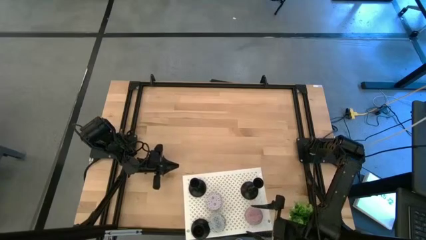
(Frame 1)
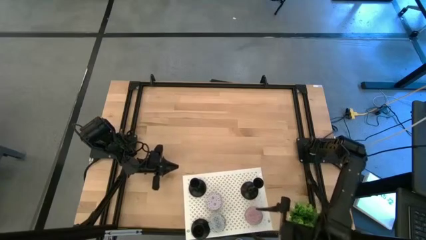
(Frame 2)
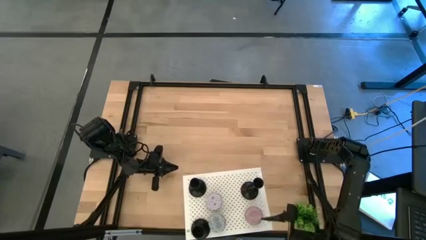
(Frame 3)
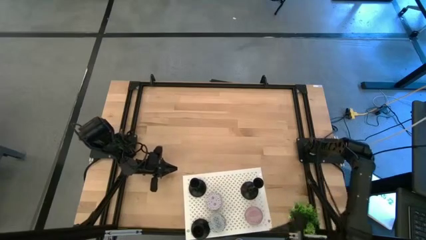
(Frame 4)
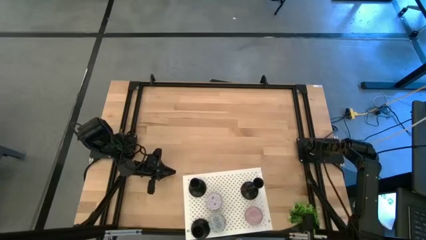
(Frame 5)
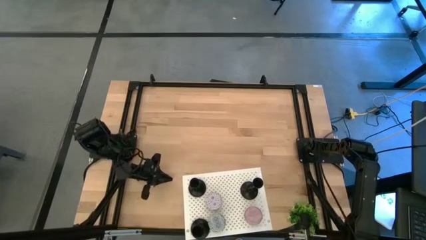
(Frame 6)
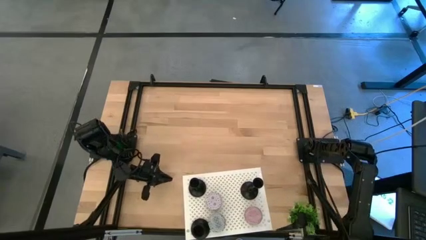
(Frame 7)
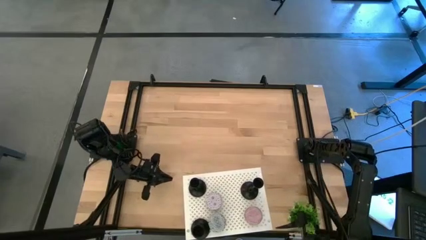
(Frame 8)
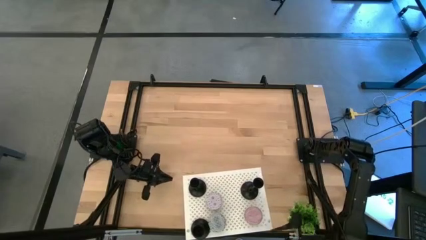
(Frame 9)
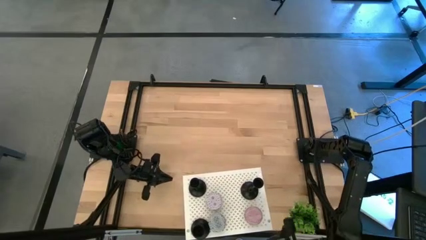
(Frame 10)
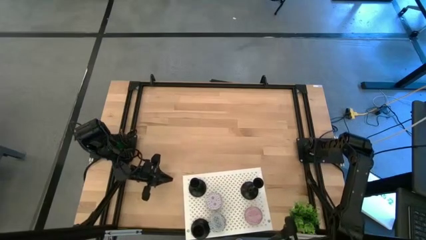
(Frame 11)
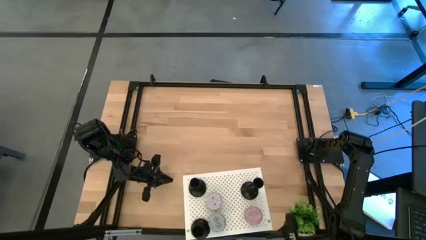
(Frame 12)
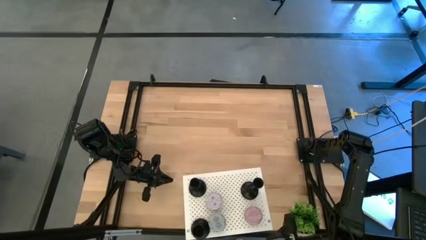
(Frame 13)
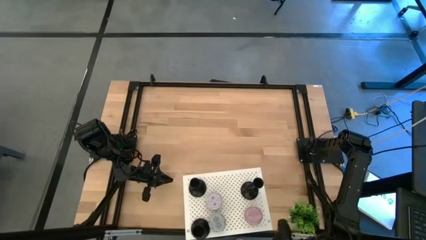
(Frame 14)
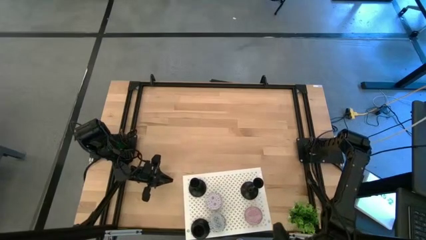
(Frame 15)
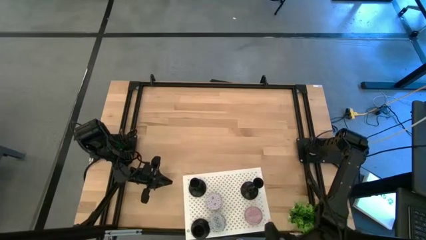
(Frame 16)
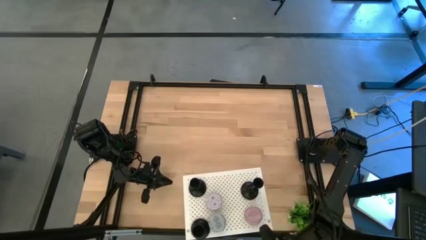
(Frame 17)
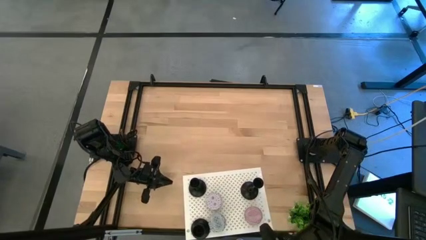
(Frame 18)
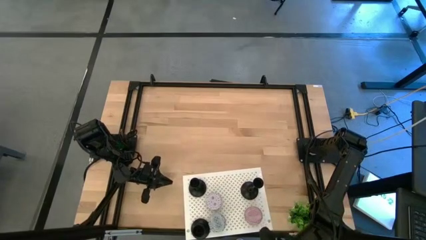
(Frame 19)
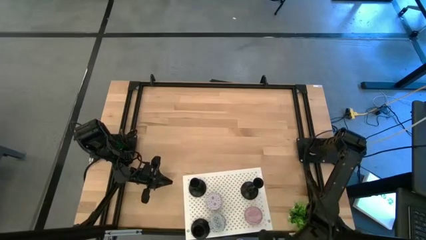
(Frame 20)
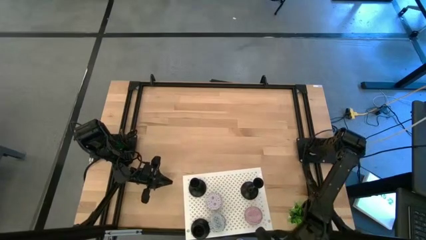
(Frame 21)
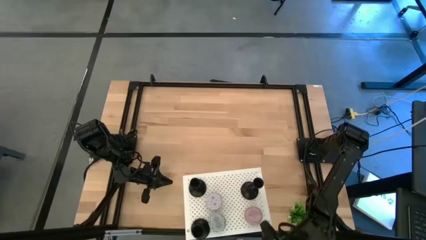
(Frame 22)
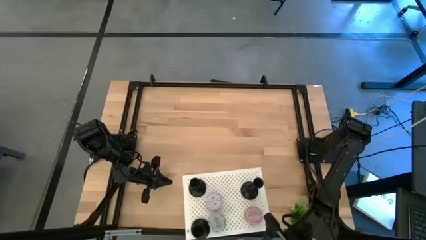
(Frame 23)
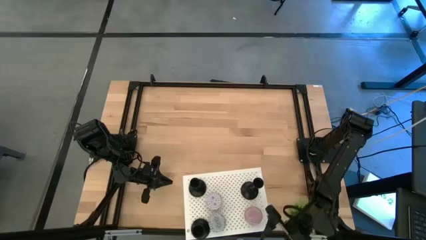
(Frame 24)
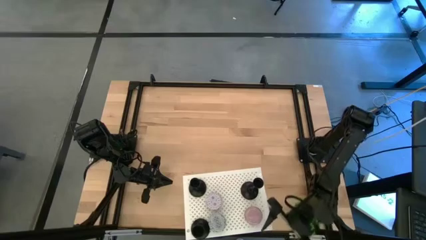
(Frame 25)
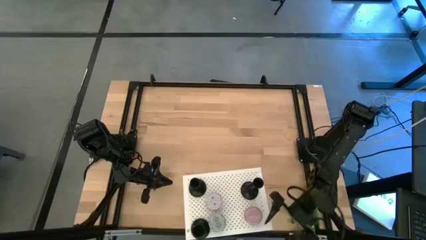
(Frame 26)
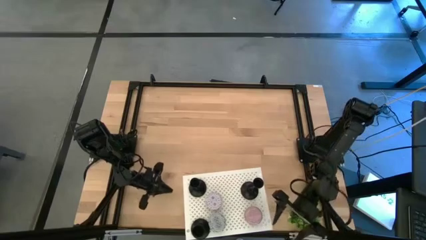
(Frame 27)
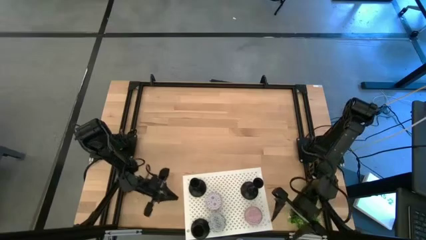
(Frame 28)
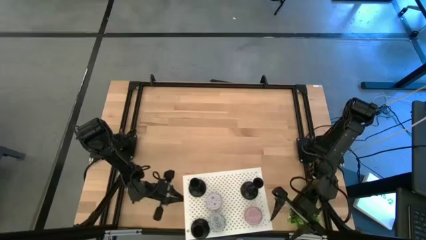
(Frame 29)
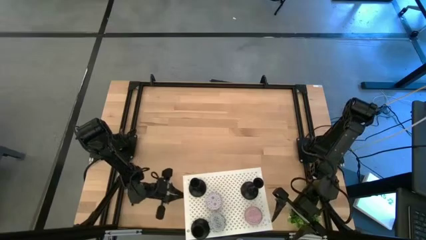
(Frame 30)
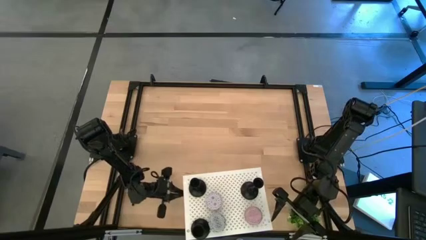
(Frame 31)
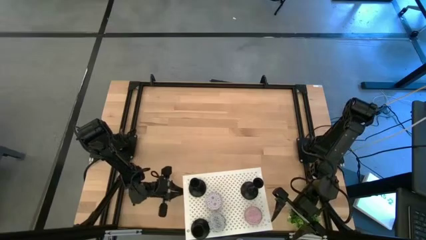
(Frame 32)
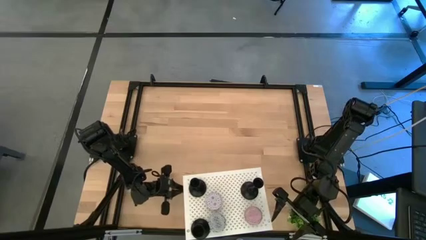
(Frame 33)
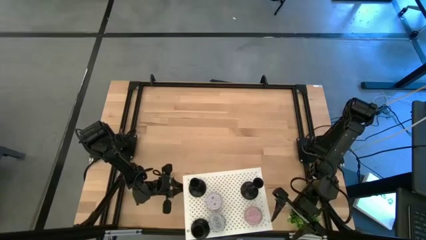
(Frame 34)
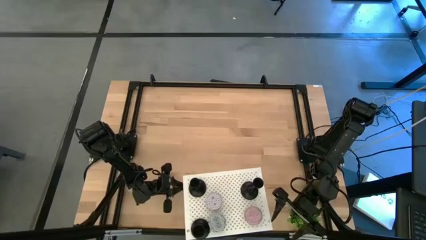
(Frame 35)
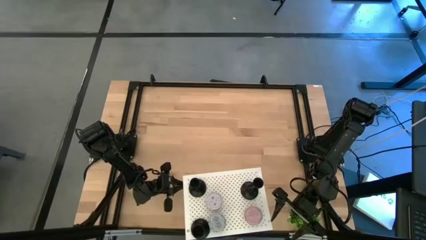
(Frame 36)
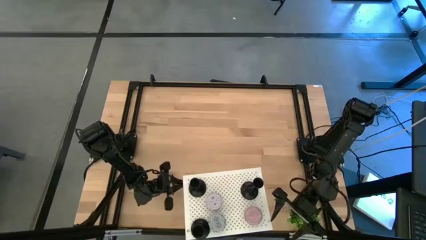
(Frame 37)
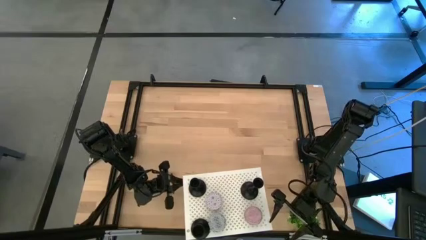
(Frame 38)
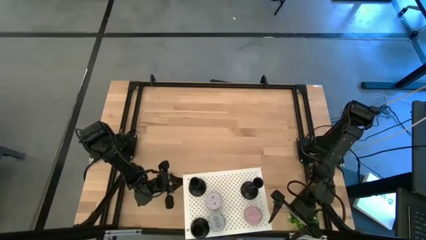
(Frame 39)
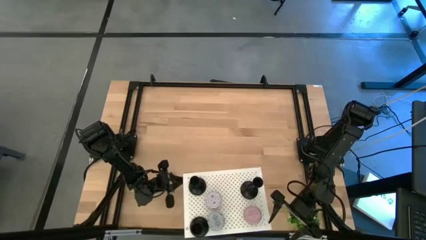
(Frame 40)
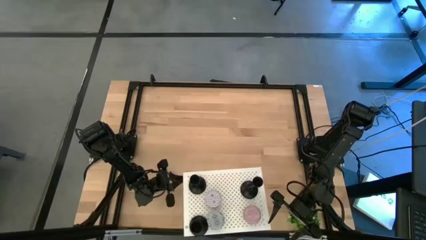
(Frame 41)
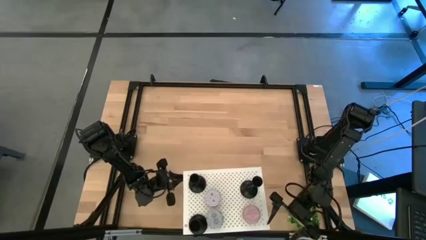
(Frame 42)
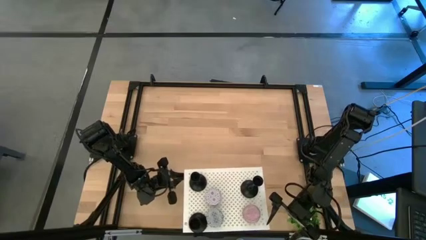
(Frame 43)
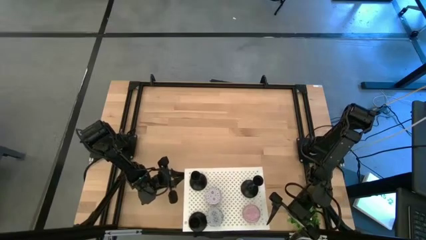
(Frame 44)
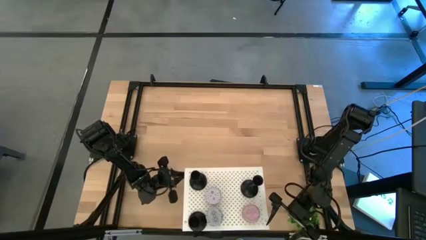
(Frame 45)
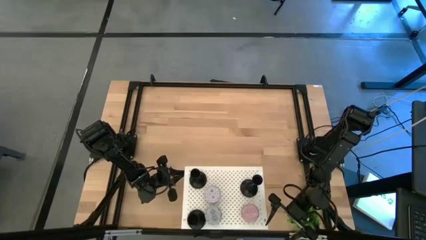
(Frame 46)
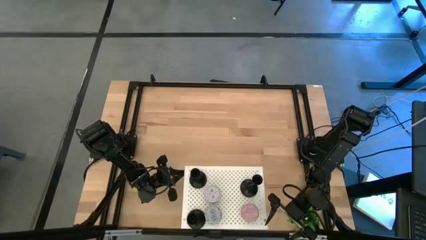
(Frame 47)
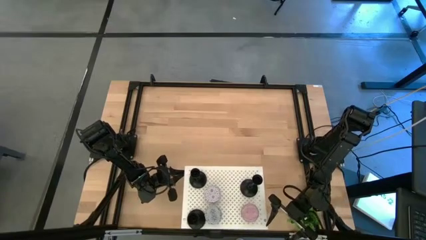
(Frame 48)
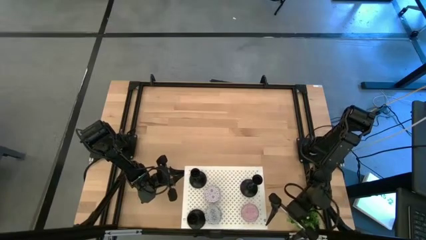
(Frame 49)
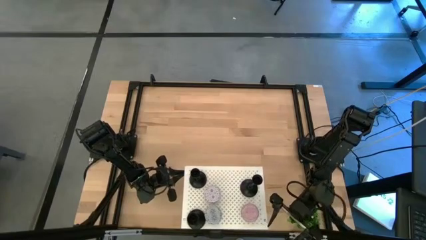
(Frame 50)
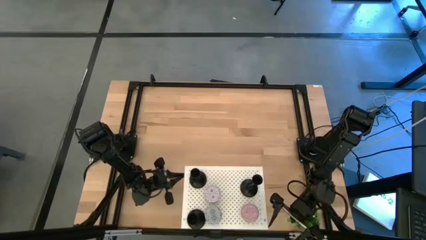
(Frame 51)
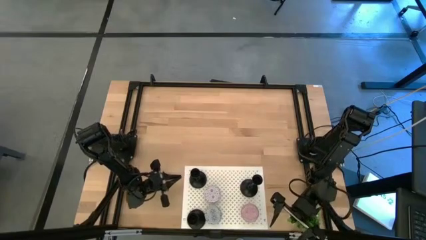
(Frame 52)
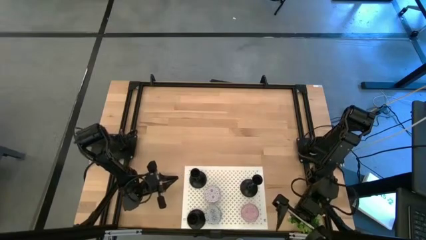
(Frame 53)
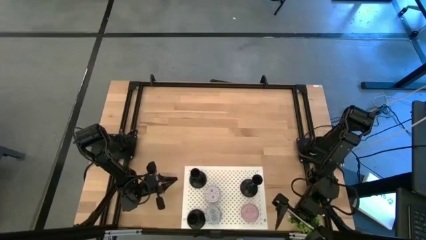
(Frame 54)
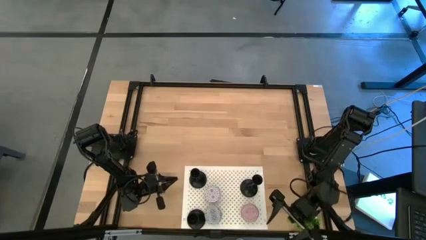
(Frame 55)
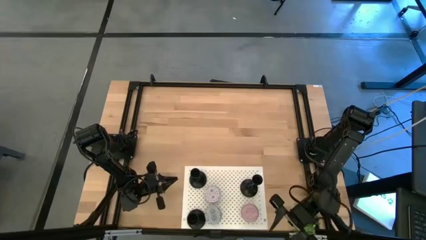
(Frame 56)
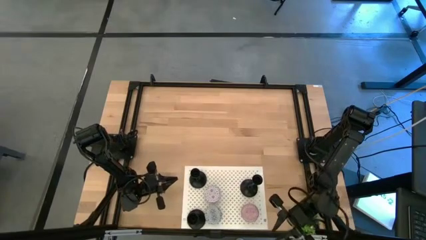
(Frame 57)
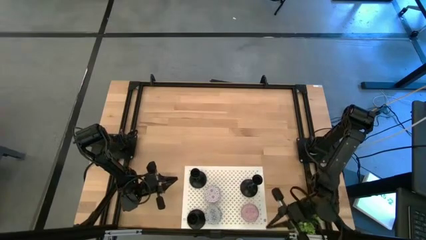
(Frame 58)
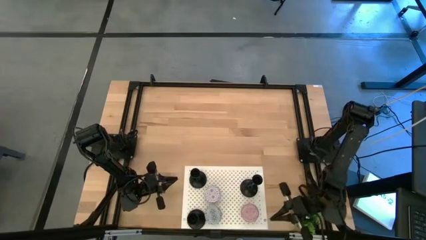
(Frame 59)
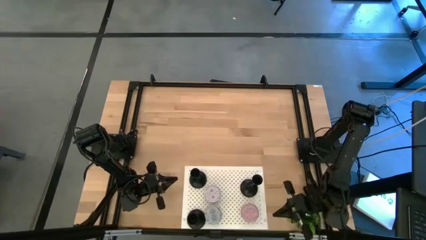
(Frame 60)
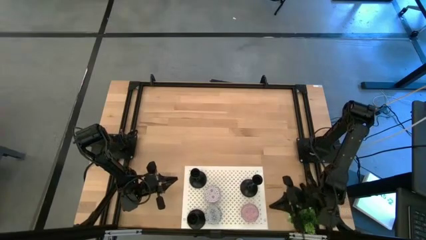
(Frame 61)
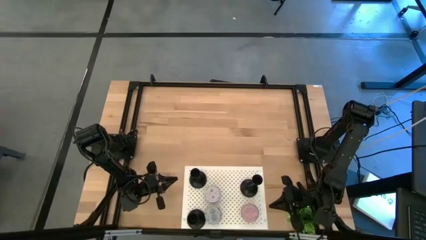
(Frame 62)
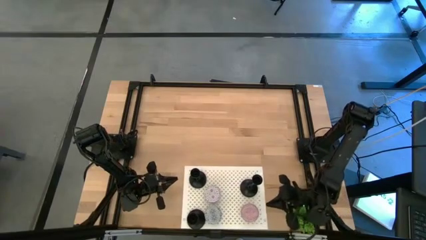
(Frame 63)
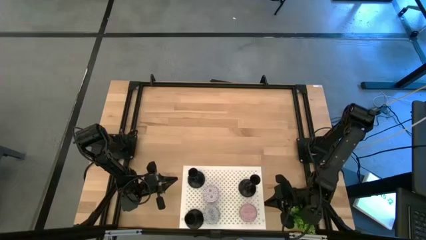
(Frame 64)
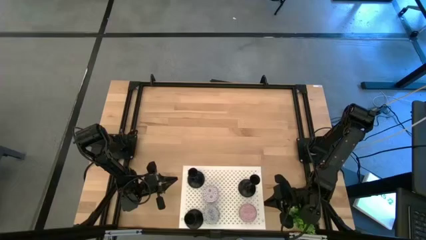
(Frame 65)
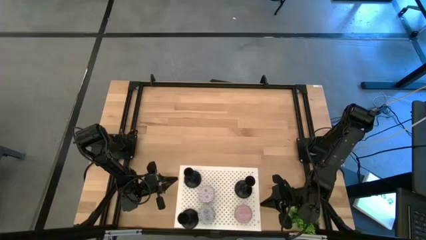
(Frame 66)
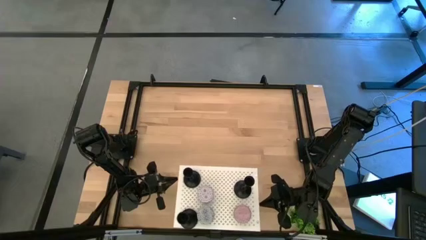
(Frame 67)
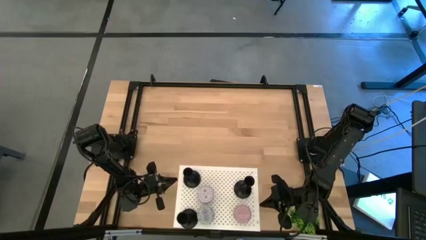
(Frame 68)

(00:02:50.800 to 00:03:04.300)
Task: Pick & Place candle stick holders
Adjust the shelf on the table

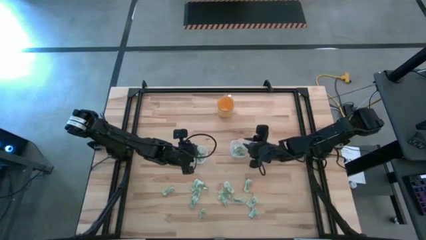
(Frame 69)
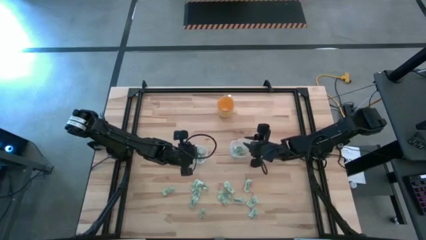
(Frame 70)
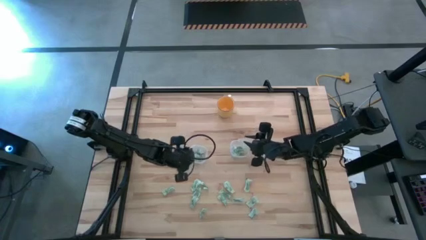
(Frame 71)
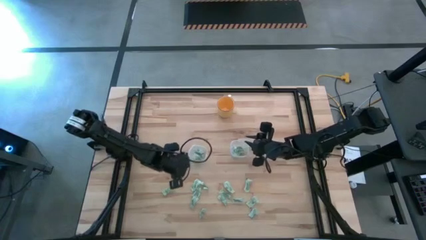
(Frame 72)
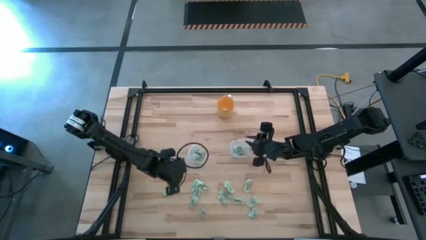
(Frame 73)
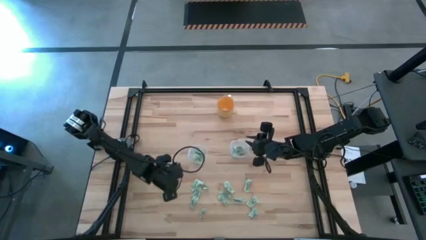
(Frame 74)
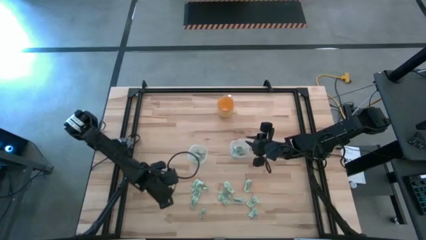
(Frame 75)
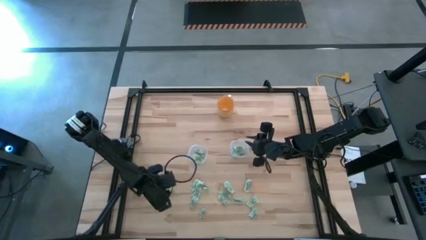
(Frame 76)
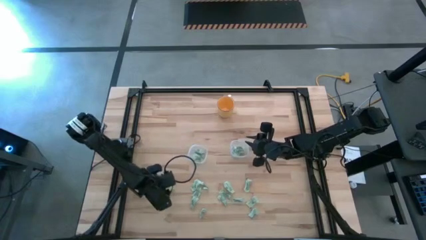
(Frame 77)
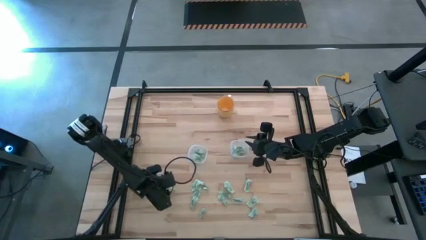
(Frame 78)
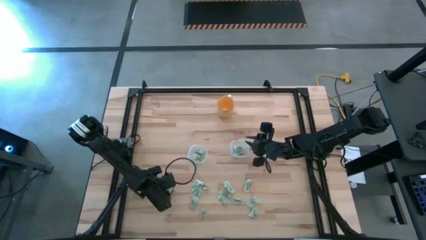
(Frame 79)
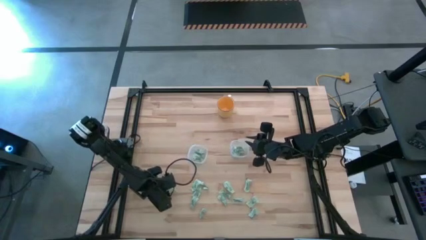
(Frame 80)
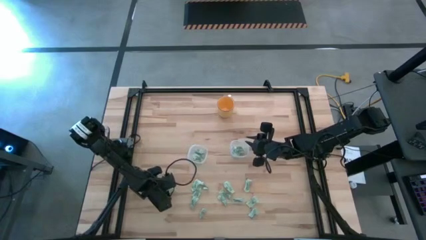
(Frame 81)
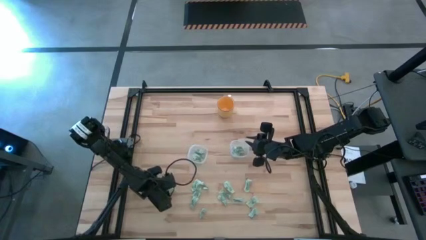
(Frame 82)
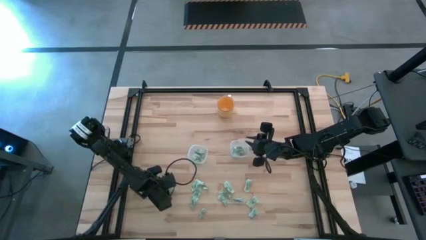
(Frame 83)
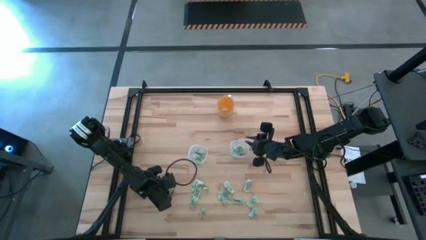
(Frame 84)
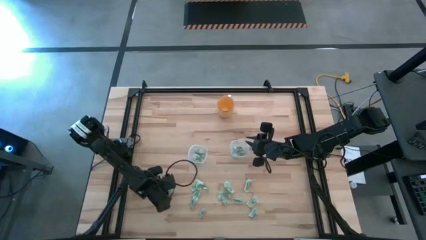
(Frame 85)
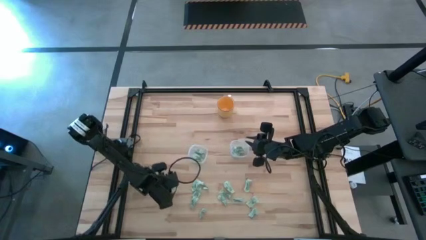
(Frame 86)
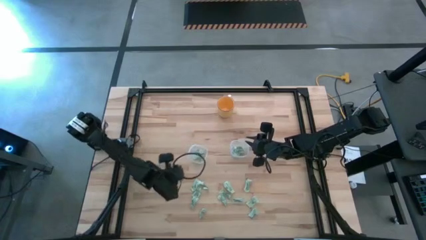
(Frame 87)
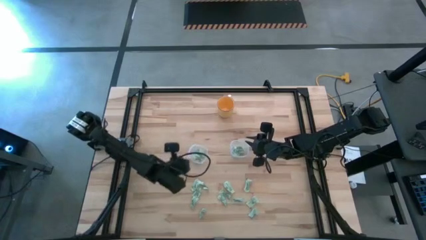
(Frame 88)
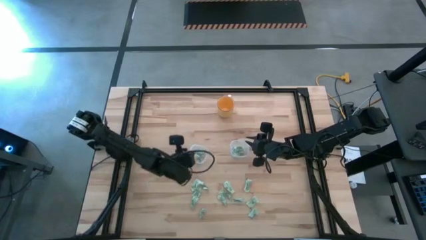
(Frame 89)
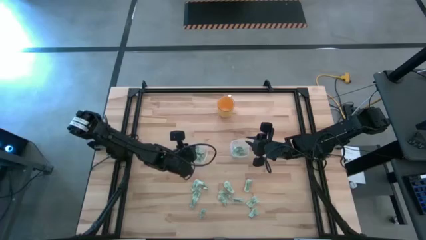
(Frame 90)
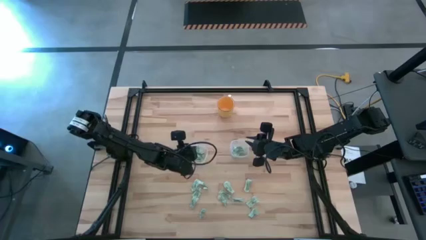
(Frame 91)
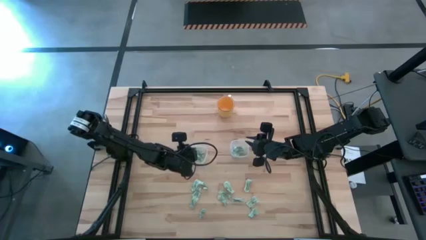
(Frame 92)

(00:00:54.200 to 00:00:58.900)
Task: Pick and place items into bin
Put the green sweetener bag into the left transparent food container
